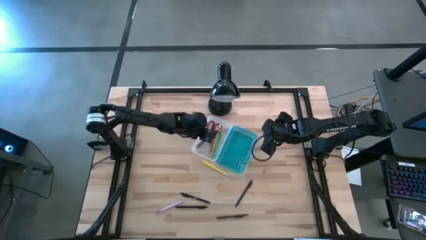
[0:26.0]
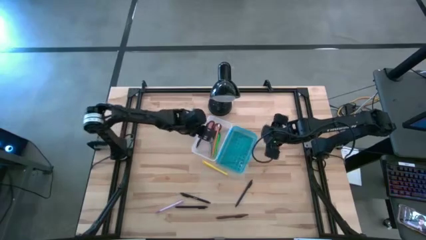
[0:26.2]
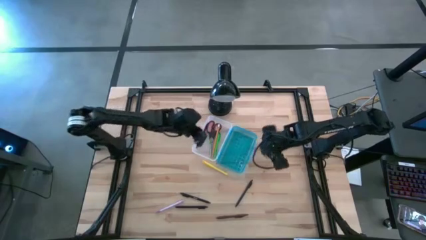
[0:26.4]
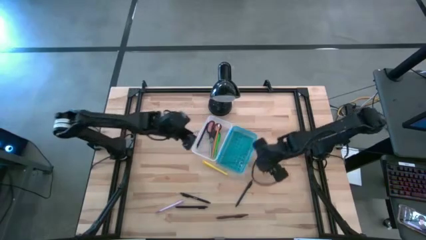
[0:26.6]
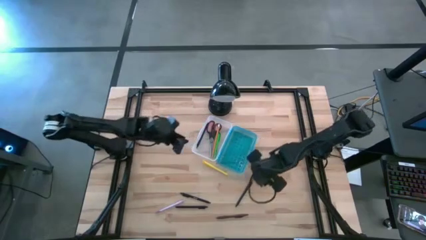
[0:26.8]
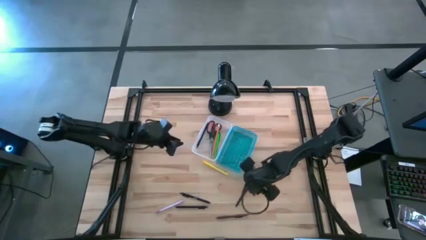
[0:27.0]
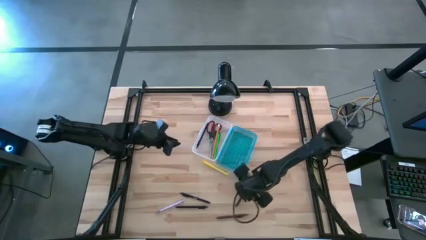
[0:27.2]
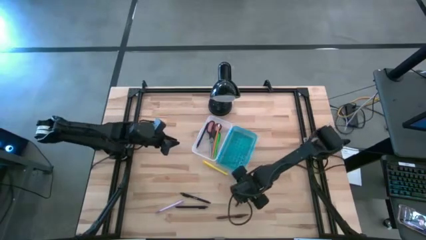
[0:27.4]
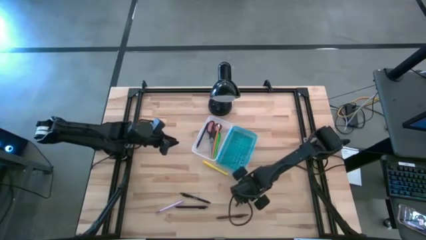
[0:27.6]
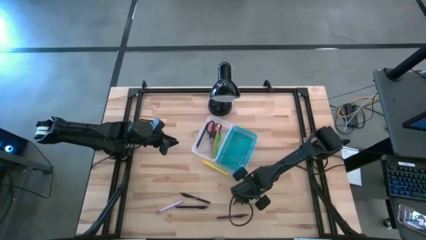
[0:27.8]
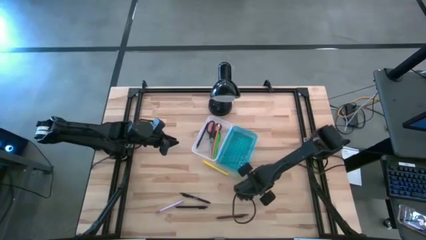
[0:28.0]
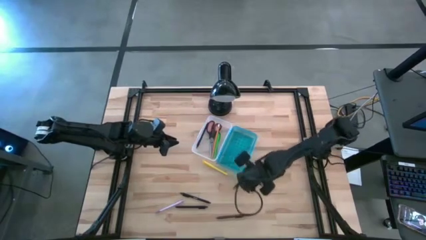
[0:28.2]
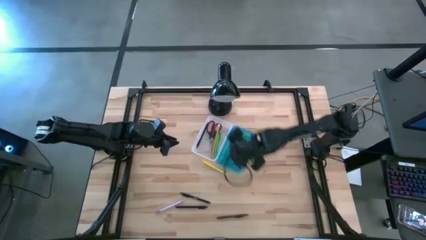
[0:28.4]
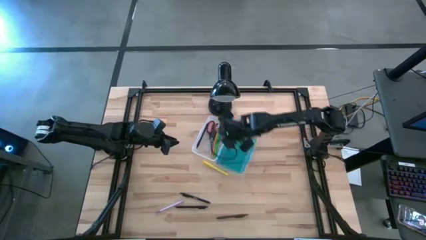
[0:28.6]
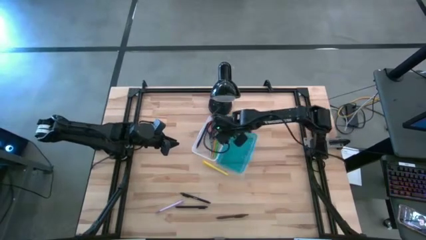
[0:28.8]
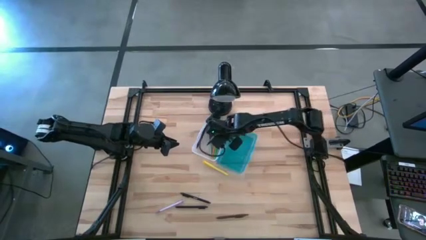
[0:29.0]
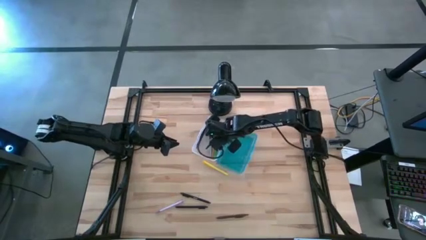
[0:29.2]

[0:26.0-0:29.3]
Task: Pick & place school supplies into a supply box
Put the black pen into the supply box

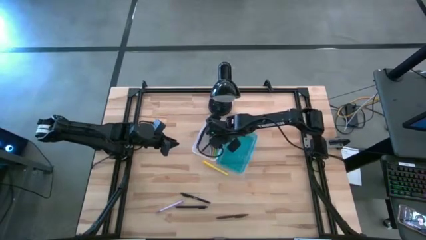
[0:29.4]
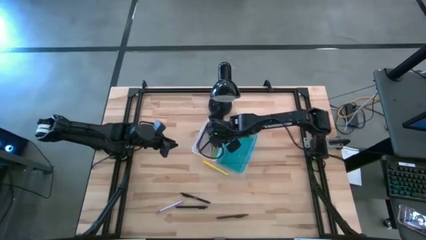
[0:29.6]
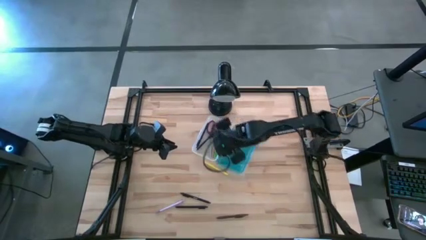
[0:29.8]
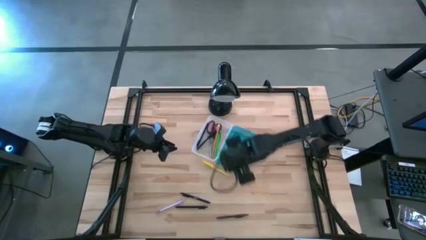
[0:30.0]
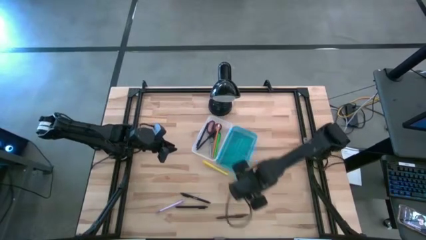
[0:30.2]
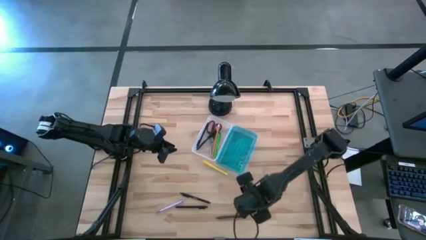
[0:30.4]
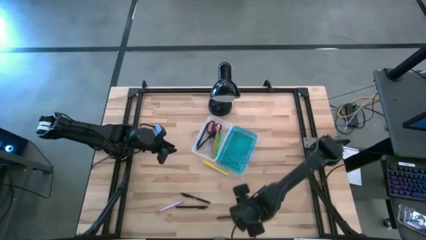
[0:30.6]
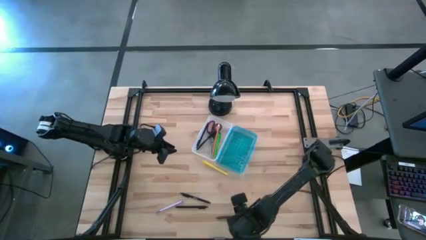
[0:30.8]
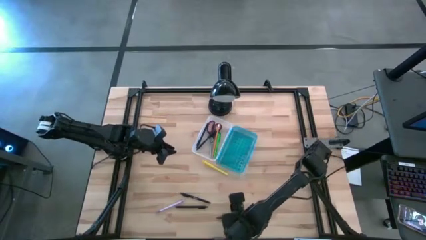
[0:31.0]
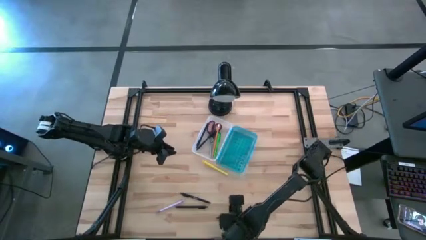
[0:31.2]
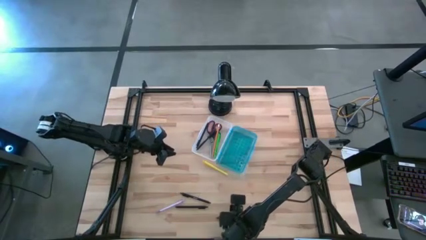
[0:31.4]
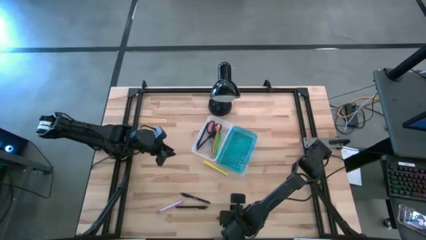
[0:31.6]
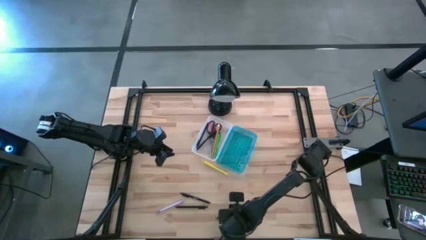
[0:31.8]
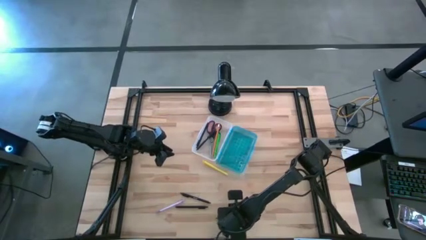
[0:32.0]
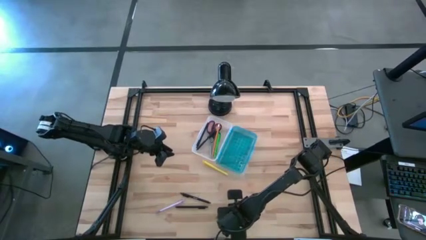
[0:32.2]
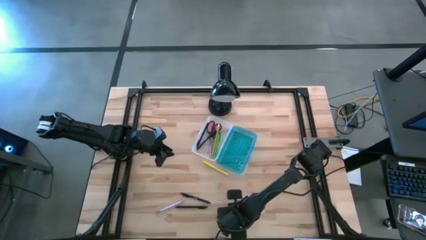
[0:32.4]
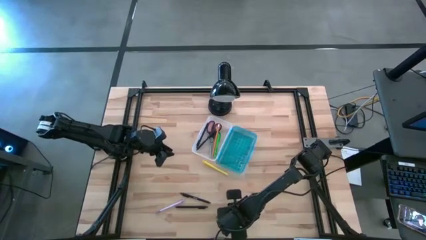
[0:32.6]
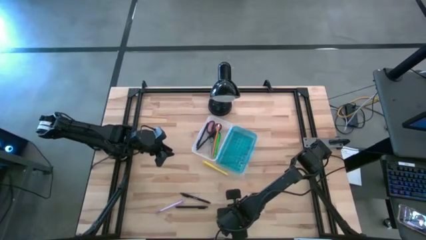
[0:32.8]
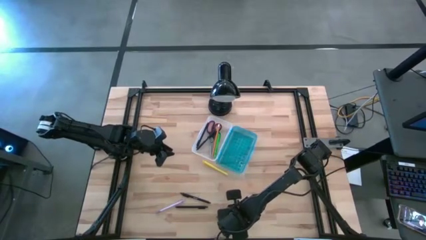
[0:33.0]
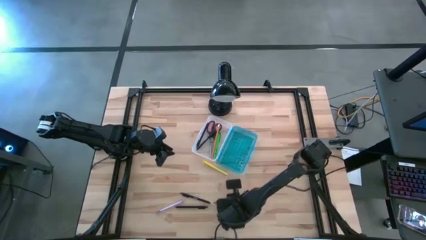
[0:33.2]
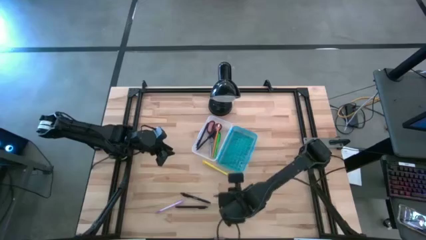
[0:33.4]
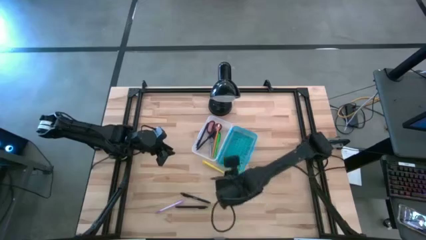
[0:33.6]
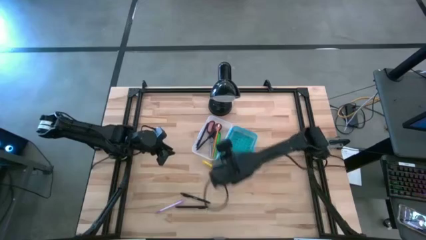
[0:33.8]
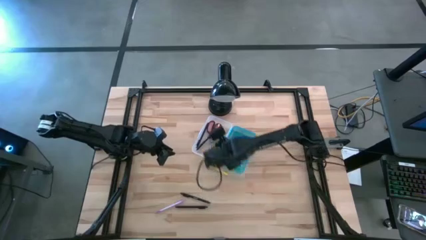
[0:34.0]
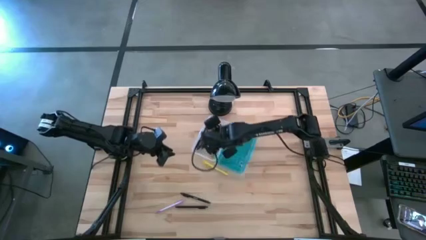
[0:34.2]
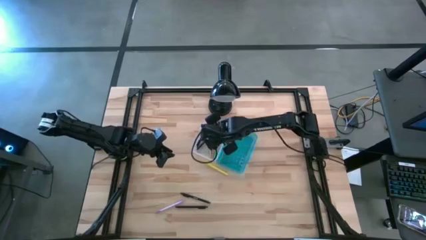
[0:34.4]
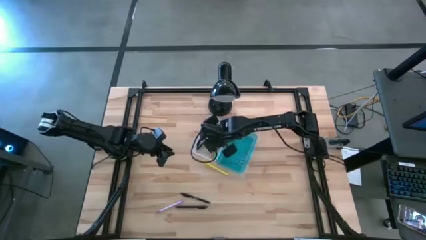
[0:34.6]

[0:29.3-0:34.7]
Put the brown pen into the supply box

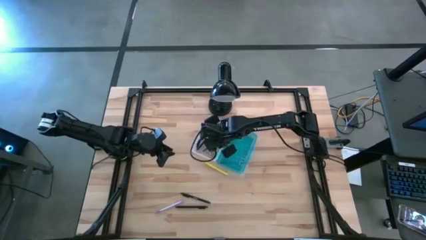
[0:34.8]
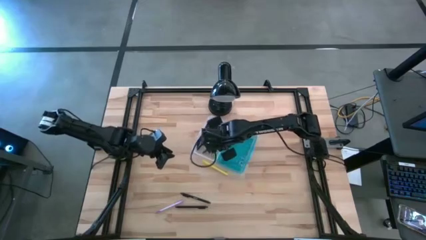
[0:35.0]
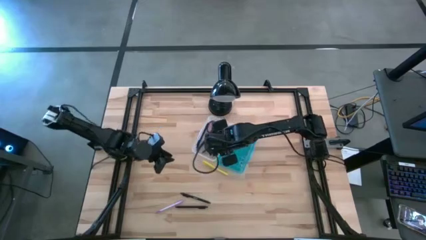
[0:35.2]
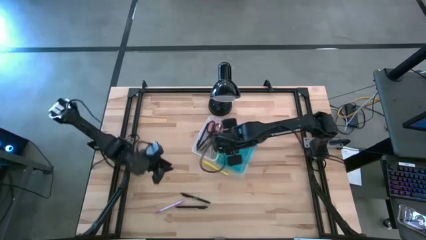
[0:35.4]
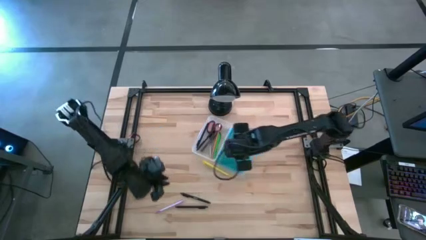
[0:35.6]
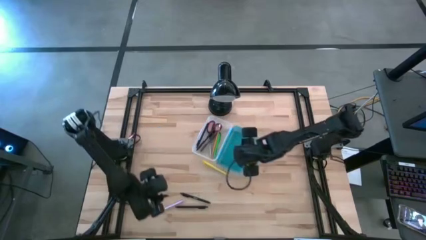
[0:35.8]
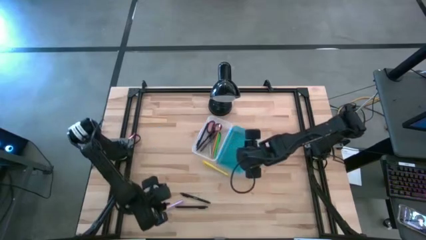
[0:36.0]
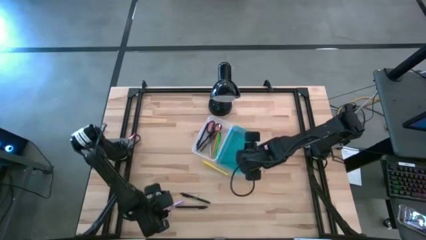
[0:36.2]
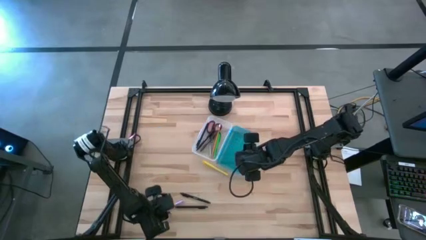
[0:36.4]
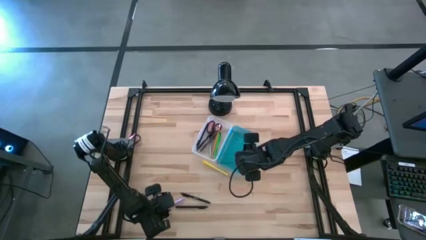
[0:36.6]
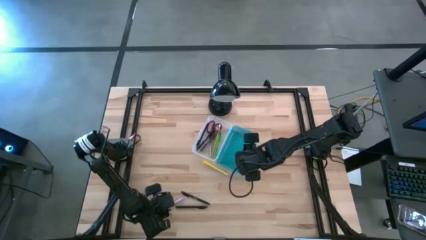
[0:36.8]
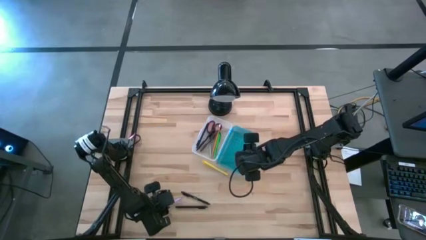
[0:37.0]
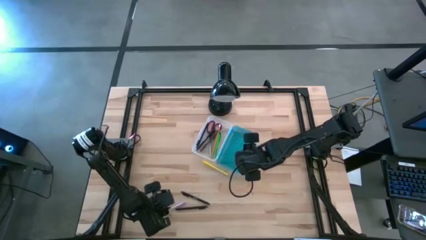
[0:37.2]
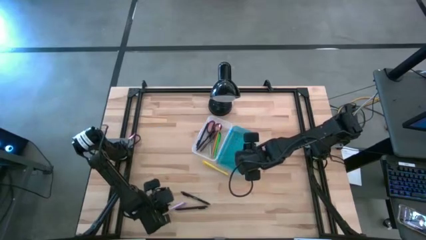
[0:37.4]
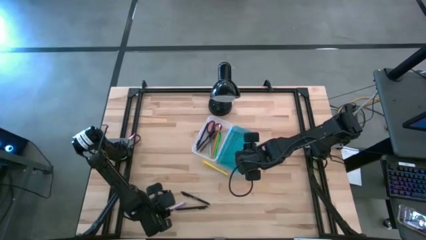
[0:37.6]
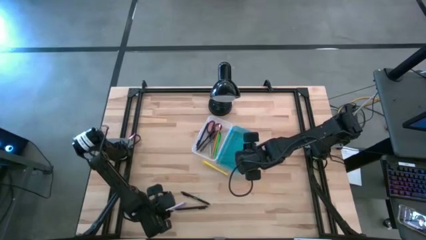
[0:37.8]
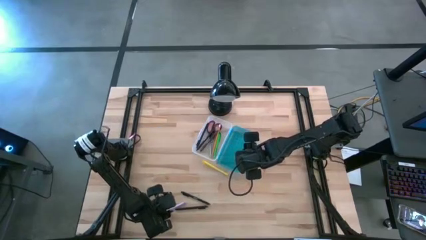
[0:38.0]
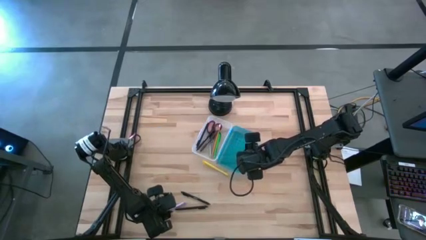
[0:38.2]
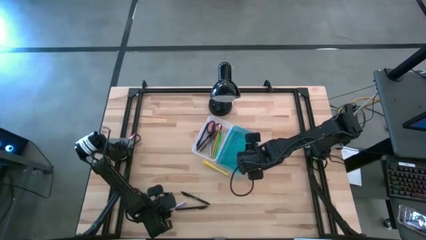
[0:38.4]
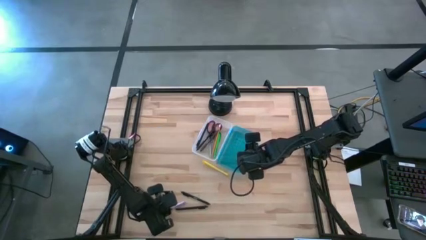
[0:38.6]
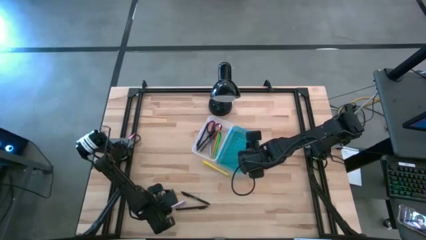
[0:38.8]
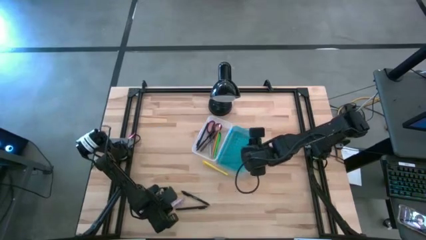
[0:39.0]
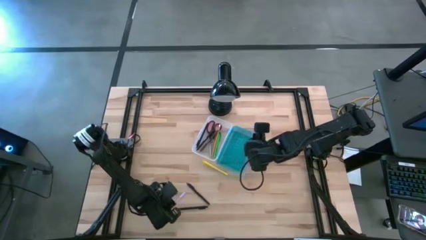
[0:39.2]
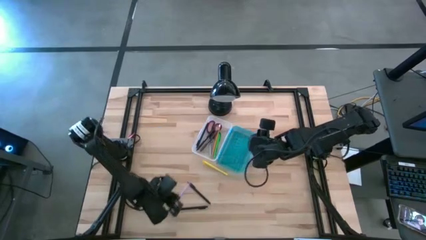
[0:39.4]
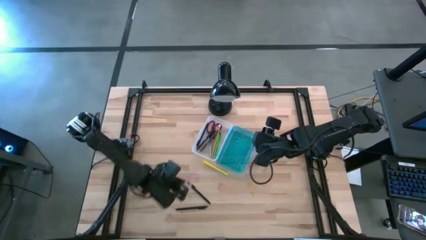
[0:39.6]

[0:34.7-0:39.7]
Put the purple pen into the supply box

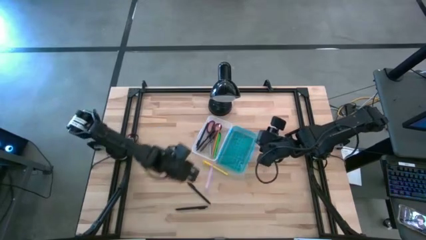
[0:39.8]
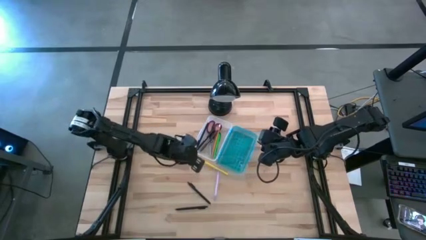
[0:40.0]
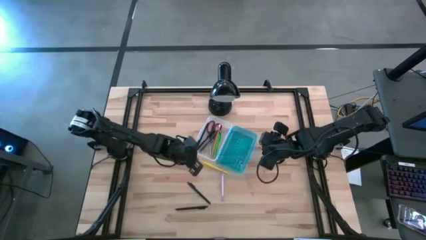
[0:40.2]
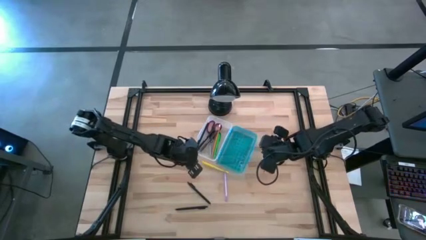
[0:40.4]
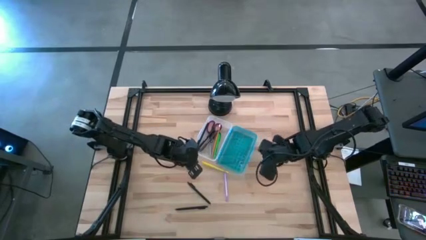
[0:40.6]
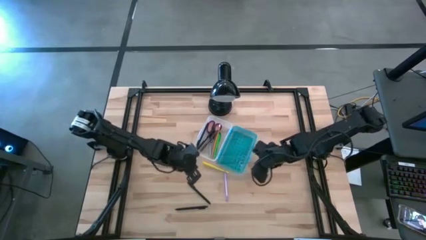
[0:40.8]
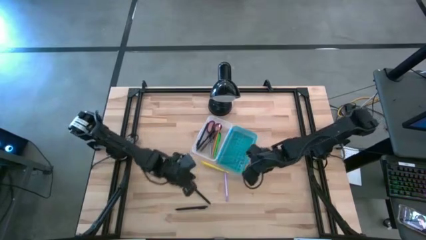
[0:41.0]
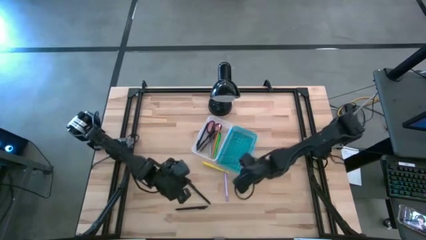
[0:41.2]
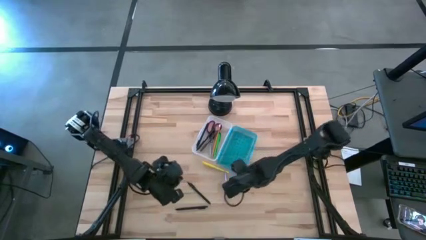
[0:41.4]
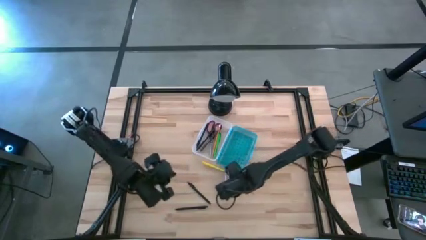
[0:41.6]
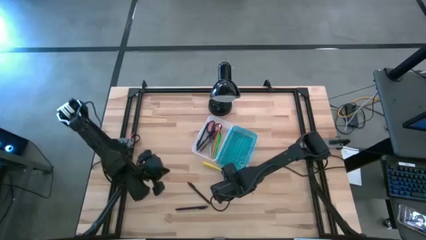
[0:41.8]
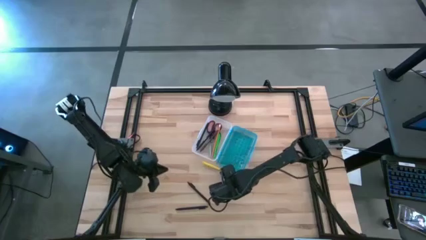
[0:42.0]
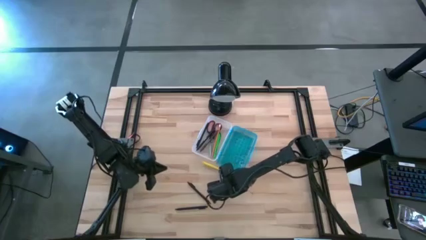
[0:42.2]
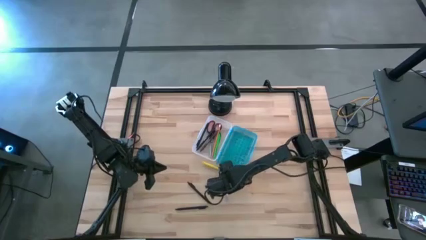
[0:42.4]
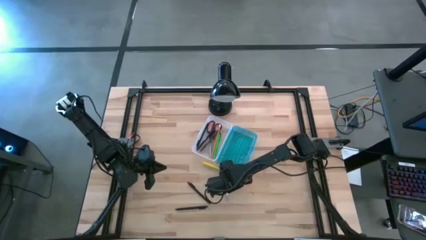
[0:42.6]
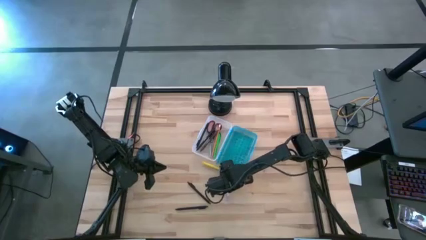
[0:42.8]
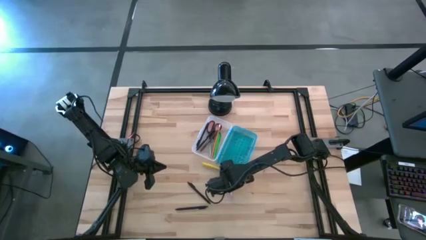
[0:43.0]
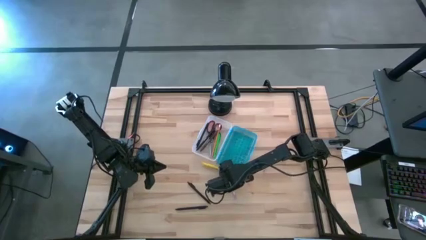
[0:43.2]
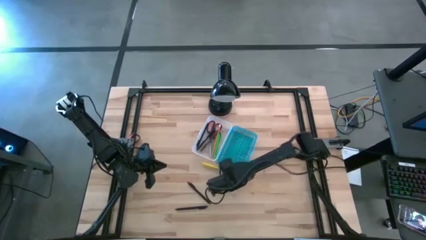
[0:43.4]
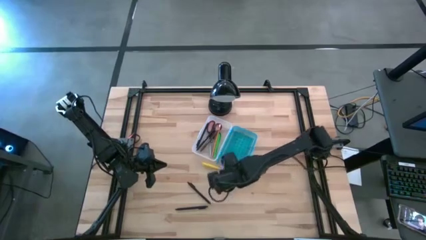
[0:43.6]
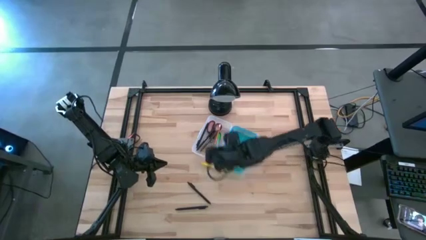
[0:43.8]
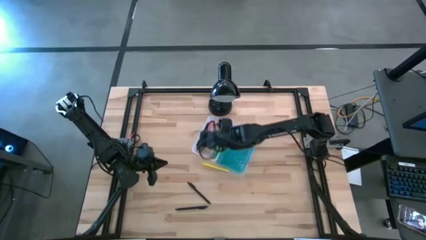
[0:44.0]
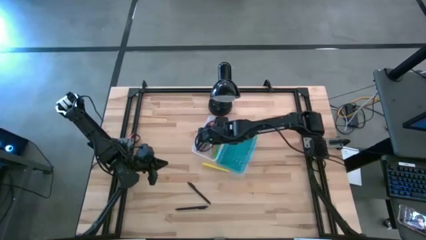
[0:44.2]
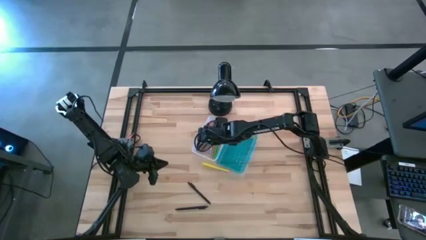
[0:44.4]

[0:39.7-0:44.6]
Put the purple pen into the supply box
